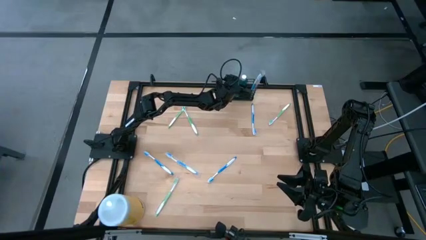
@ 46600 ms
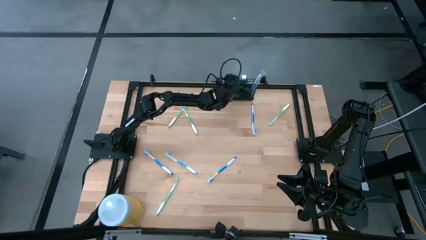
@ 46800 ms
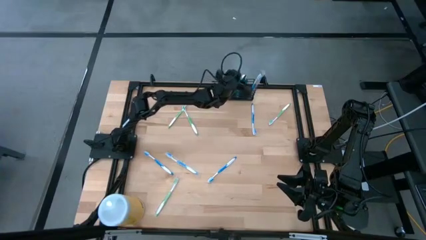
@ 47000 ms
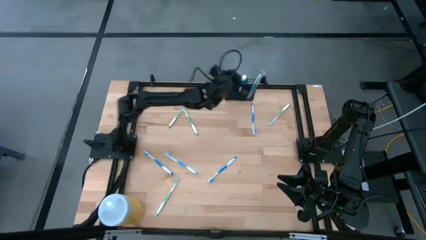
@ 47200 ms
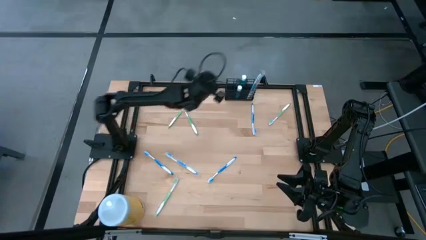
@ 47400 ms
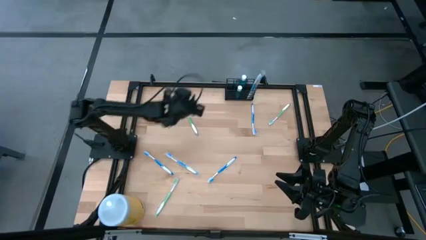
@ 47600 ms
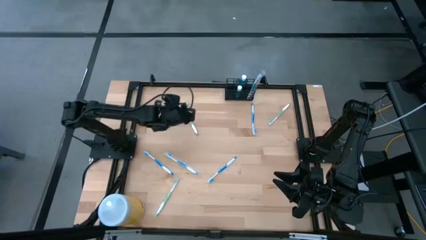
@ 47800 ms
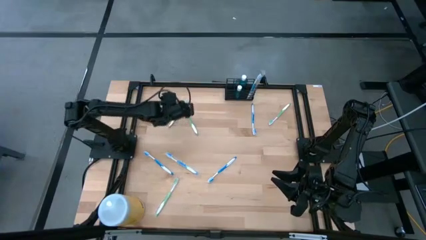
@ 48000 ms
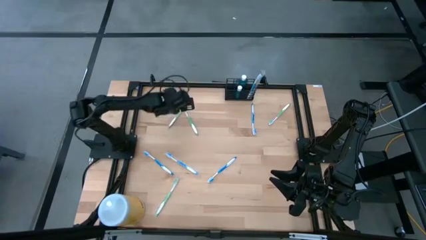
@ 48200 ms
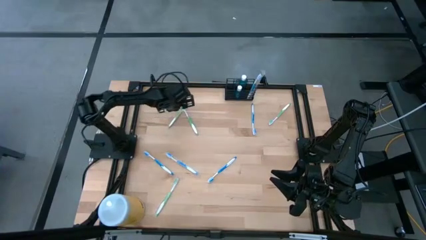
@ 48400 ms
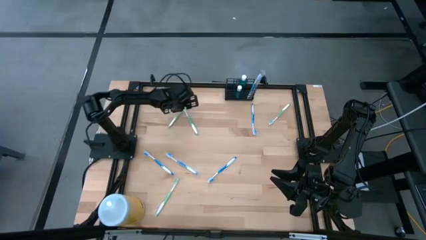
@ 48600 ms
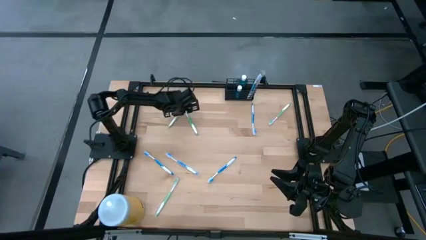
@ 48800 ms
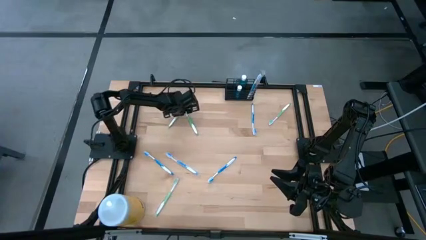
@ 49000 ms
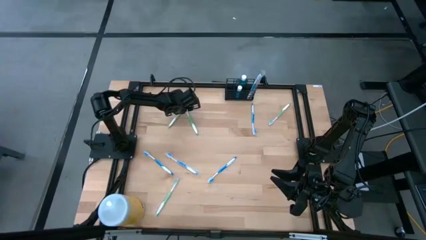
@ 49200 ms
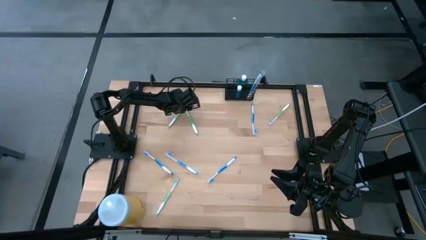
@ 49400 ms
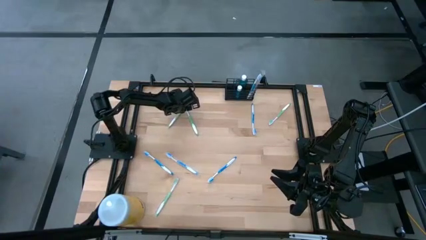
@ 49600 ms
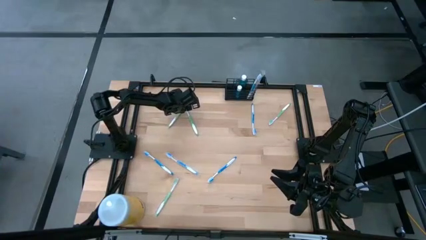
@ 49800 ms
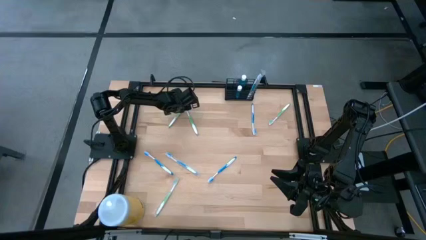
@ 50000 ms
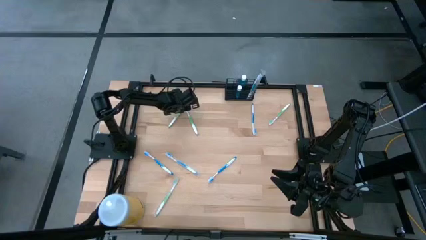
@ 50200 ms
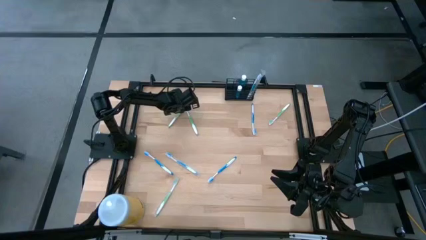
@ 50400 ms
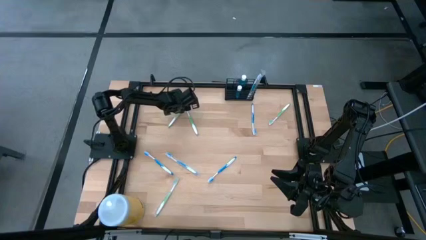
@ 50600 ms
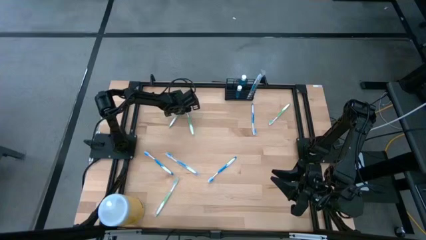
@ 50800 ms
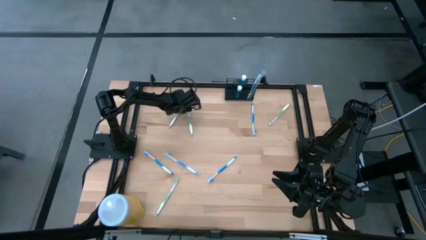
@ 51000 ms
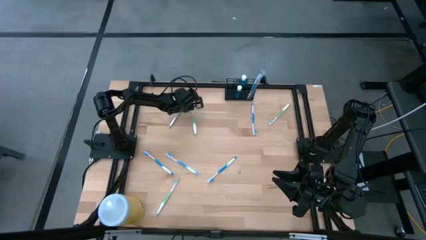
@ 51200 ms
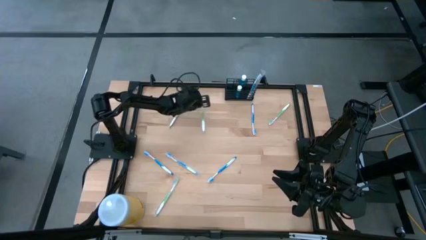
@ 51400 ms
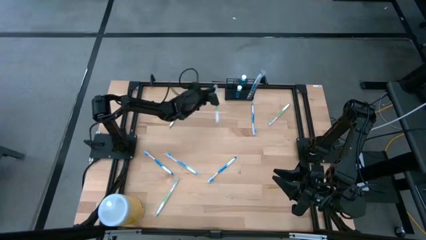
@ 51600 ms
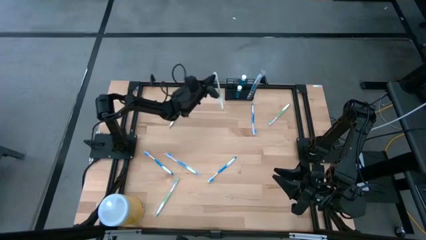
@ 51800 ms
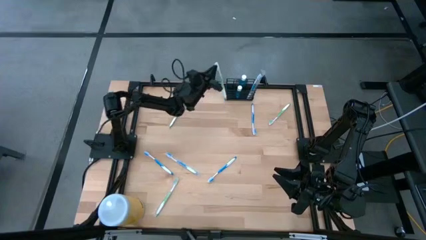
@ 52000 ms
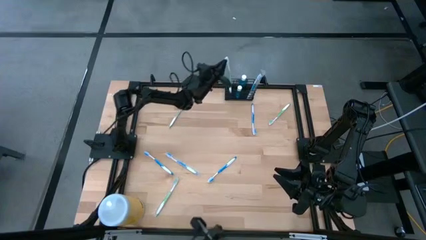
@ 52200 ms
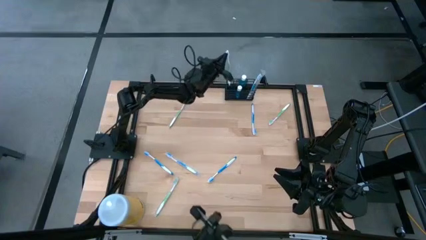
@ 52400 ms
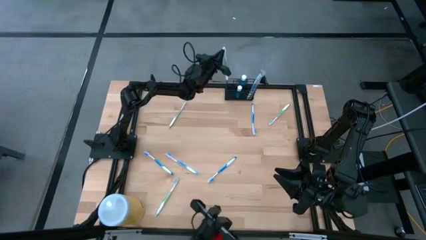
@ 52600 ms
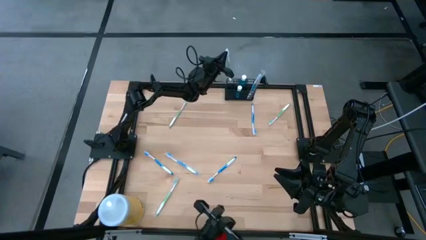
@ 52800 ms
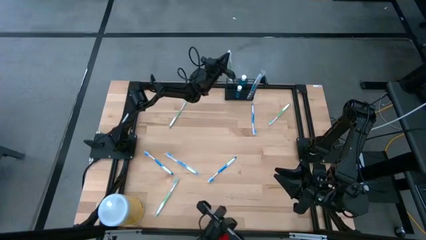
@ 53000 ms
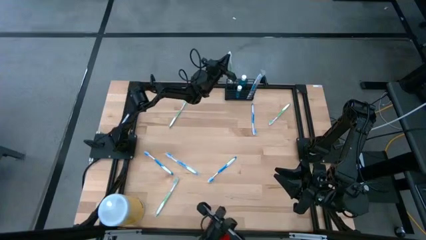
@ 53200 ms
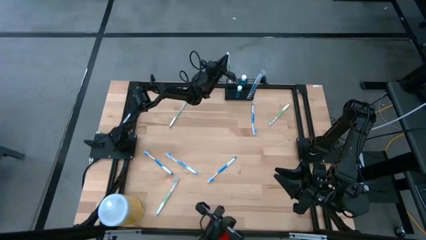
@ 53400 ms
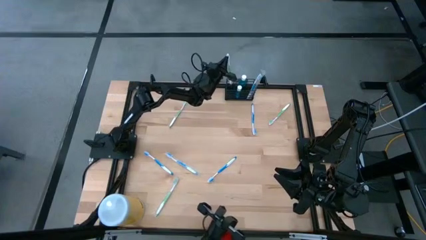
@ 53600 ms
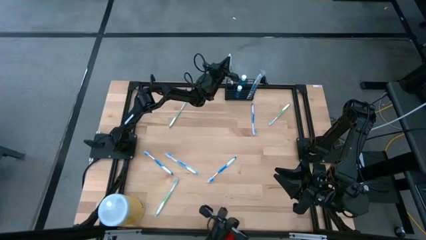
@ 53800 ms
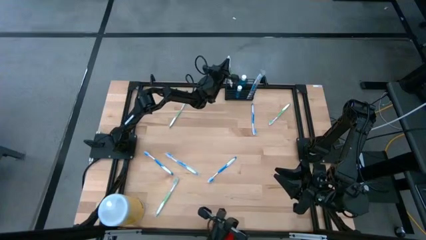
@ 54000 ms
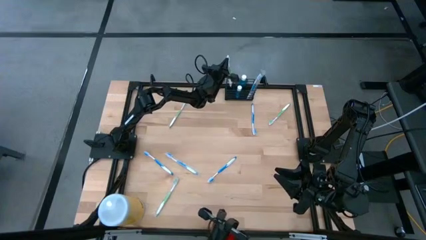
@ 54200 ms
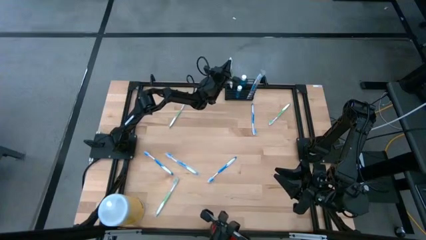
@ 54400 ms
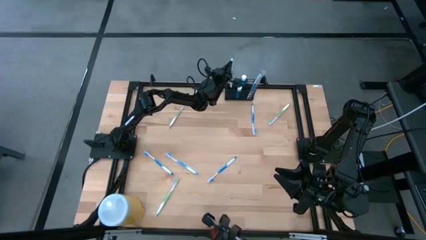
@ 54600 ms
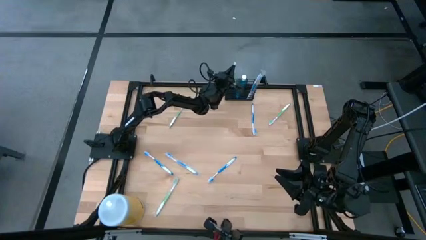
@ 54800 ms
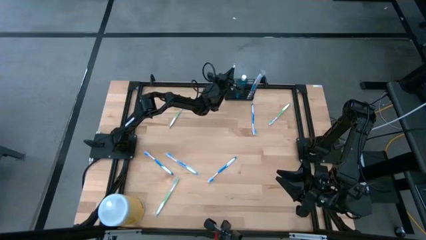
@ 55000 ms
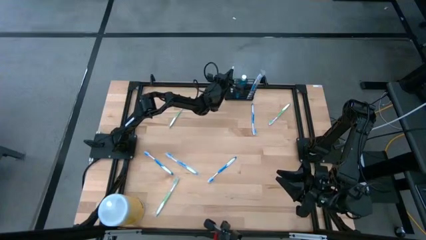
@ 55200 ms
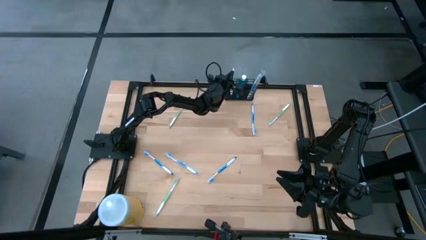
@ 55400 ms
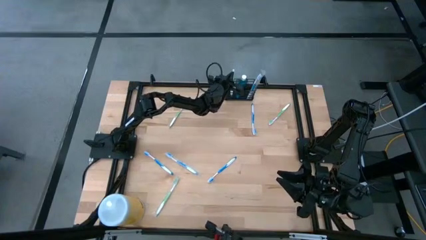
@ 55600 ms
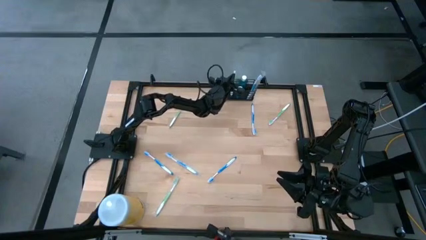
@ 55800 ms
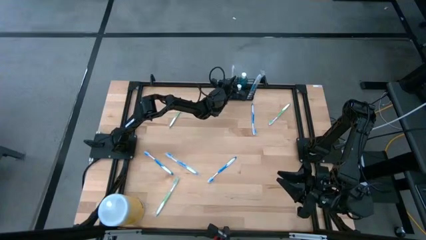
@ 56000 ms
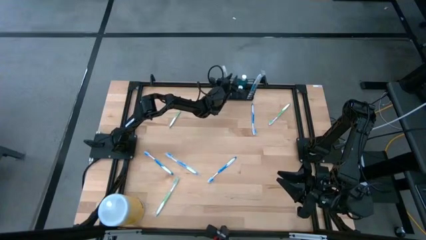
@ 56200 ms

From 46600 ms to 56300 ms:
Task: Pick & Place toothbrushing station
Put the green toothbrush into the black organizer

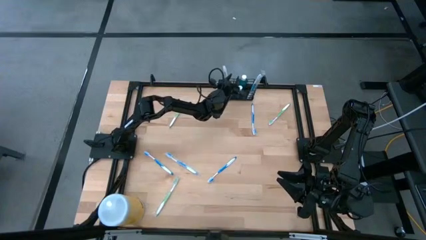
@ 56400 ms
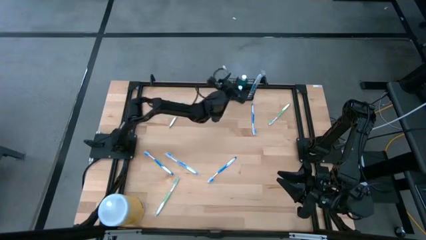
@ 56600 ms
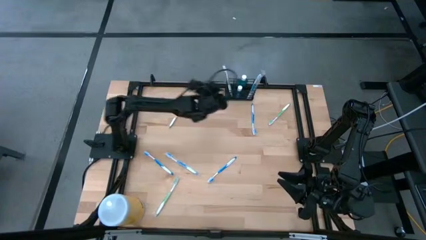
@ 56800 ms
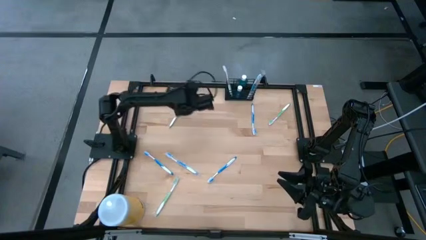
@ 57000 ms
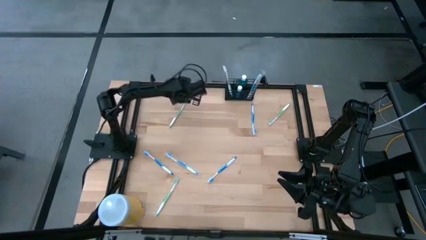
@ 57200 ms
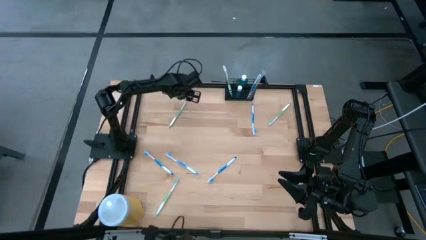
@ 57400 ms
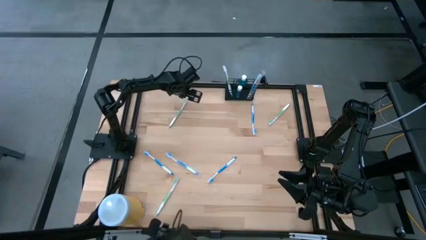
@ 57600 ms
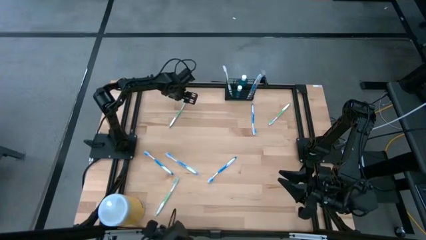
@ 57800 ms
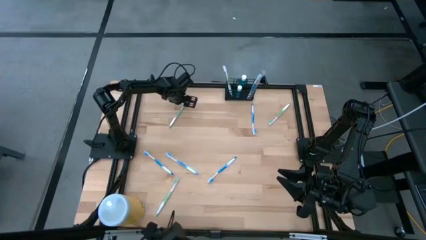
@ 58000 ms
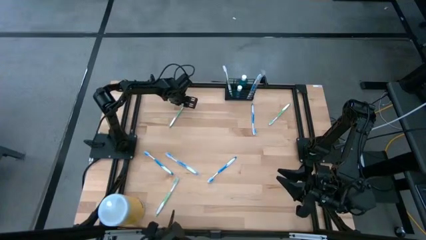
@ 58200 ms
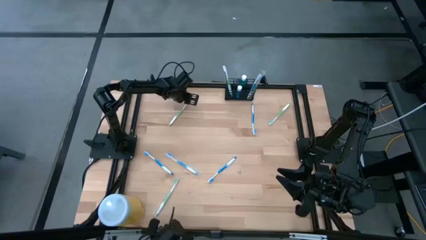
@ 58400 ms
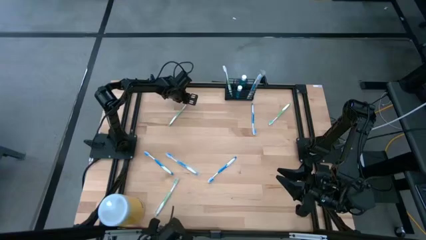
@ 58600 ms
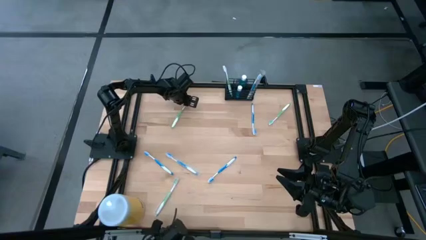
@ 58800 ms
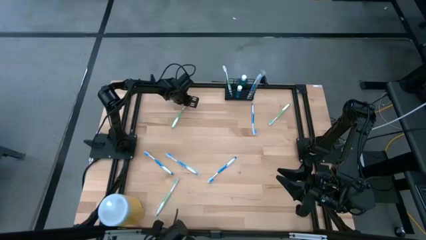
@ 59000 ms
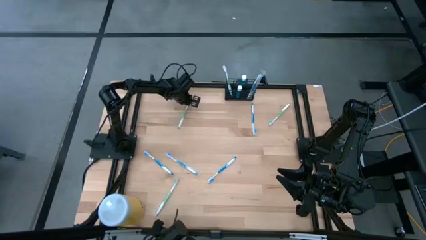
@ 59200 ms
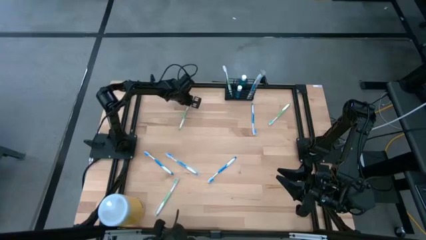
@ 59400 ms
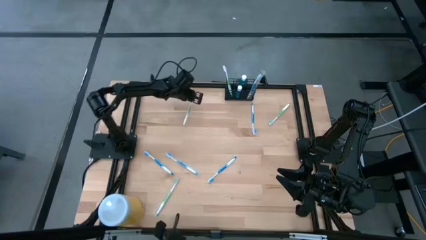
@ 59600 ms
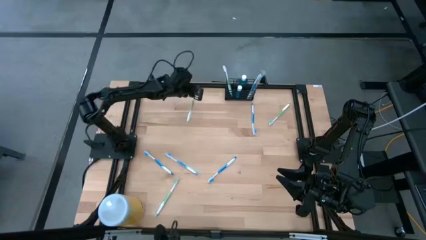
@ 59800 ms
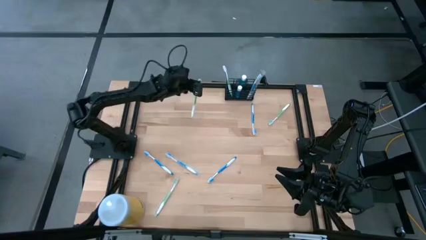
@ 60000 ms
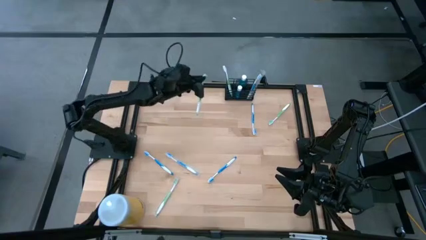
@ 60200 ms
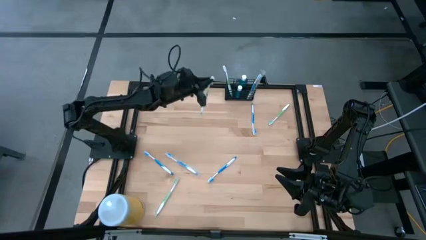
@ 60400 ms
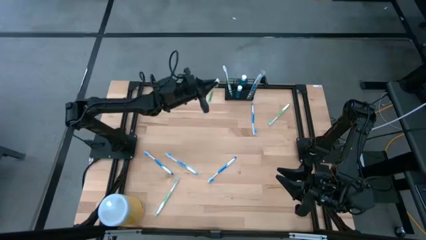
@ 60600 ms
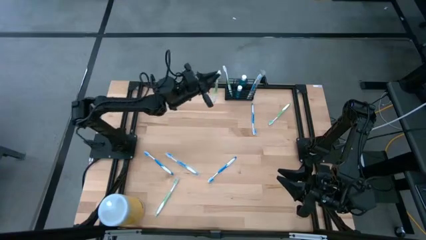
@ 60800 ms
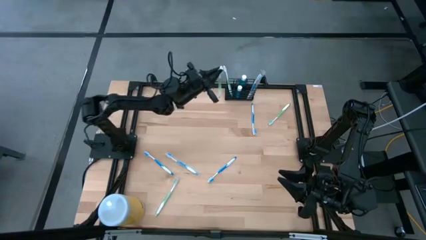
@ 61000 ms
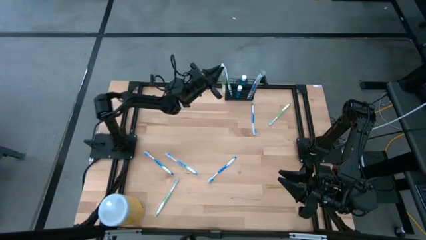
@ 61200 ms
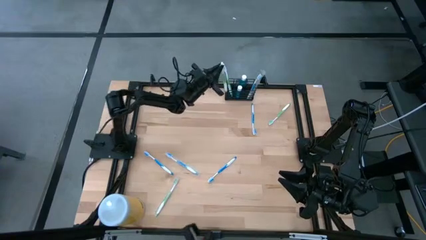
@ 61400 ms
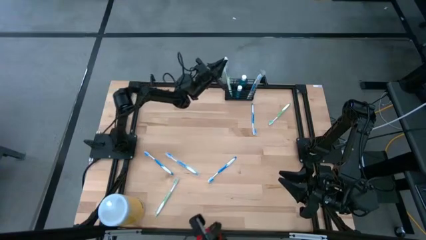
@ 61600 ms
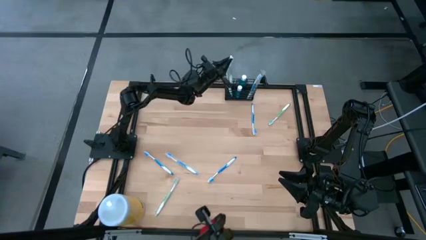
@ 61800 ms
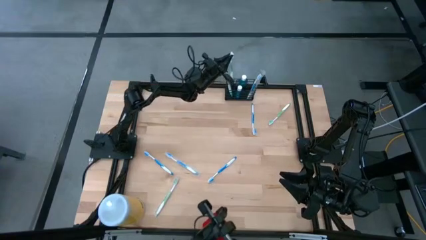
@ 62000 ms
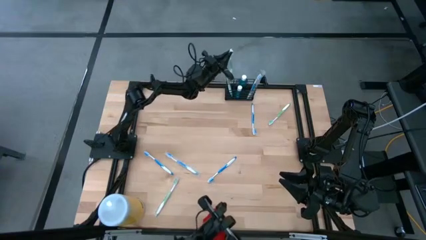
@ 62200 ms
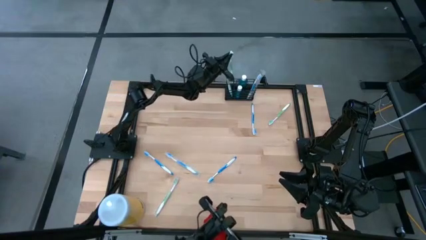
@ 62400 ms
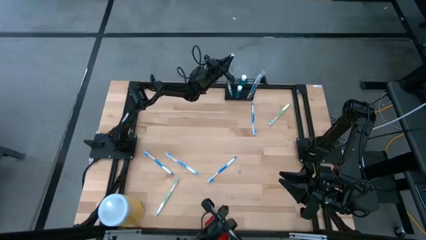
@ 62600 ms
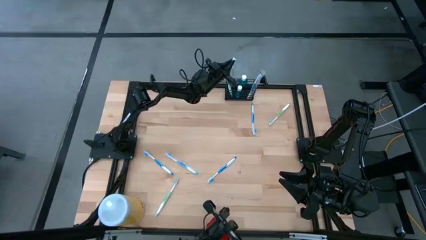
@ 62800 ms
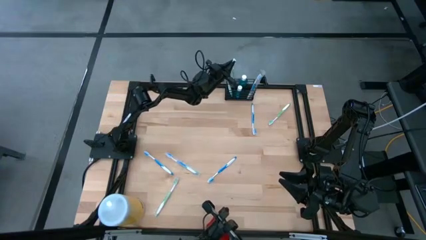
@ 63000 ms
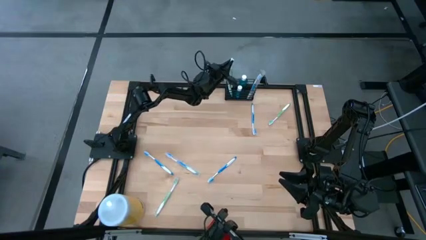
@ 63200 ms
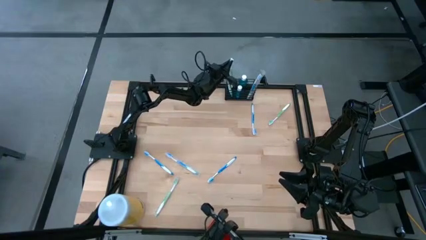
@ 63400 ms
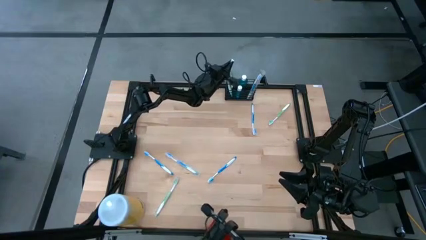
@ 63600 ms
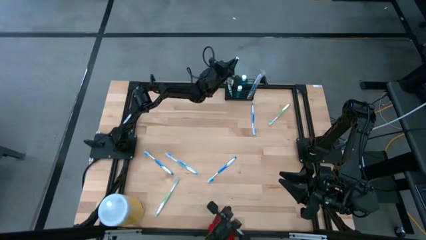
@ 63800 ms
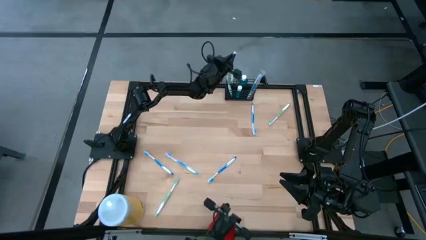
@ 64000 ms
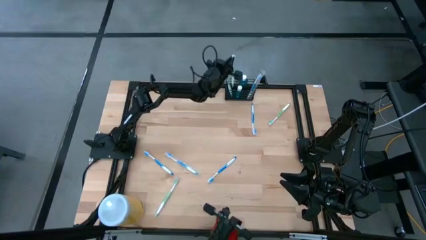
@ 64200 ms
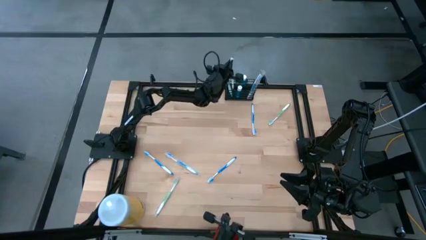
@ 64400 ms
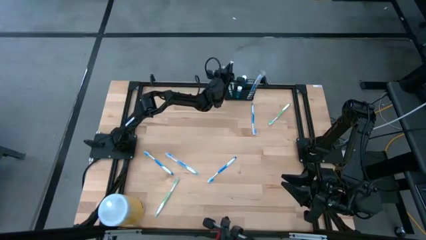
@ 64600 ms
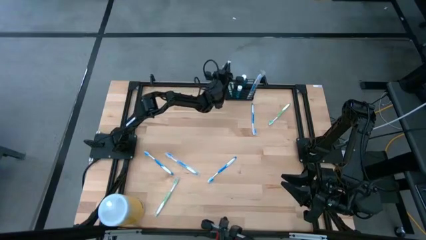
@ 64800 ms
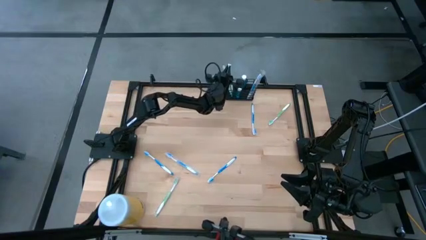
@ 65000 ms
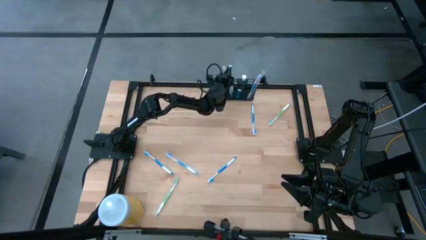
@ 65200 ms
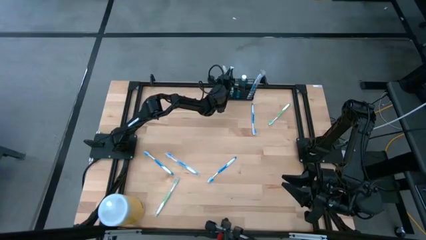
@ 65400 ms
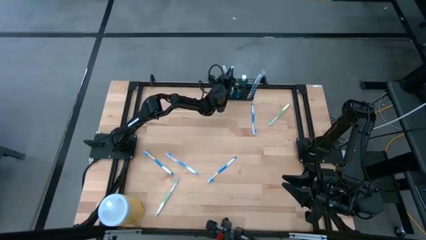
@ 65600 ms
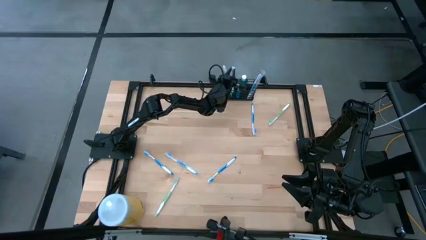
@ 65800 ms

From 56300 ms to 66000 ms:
Put the green toothbrush into the black organizer
